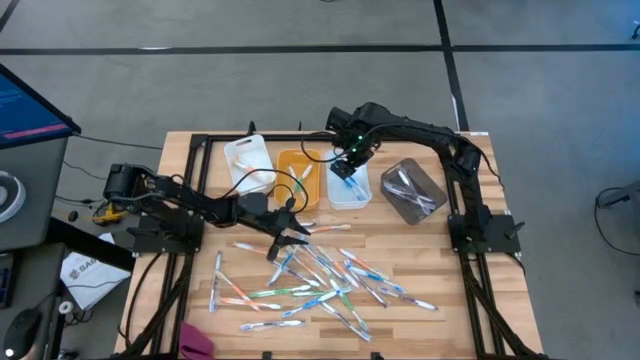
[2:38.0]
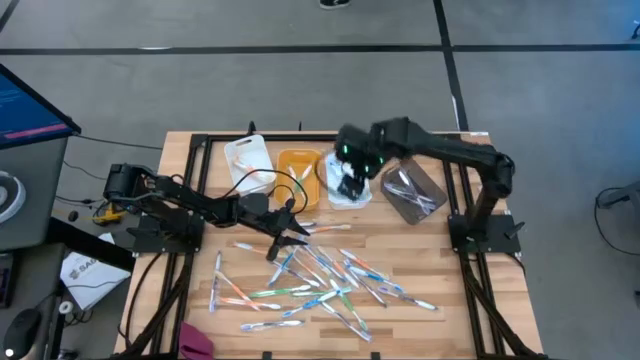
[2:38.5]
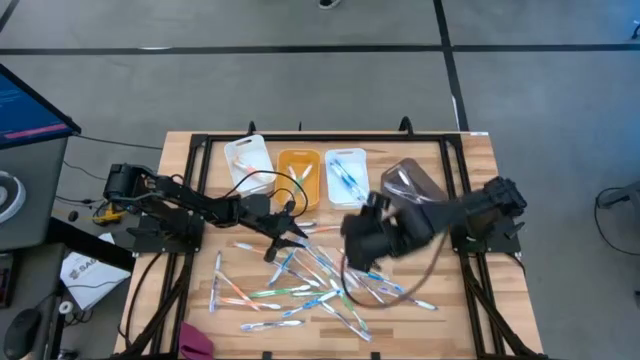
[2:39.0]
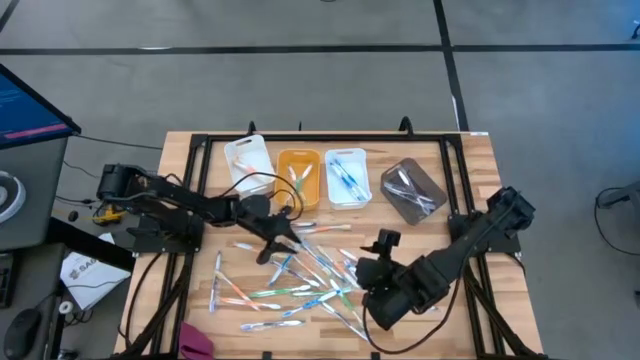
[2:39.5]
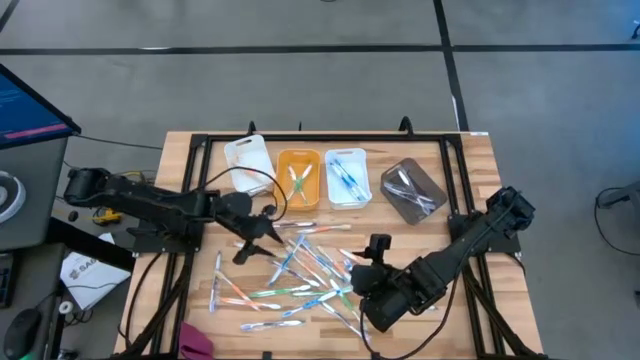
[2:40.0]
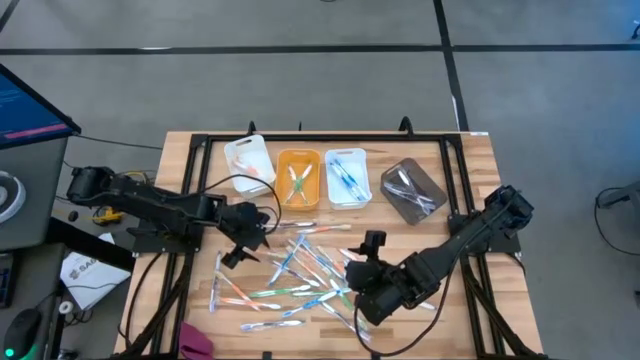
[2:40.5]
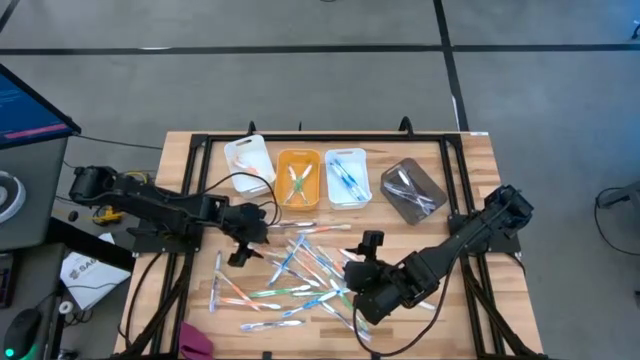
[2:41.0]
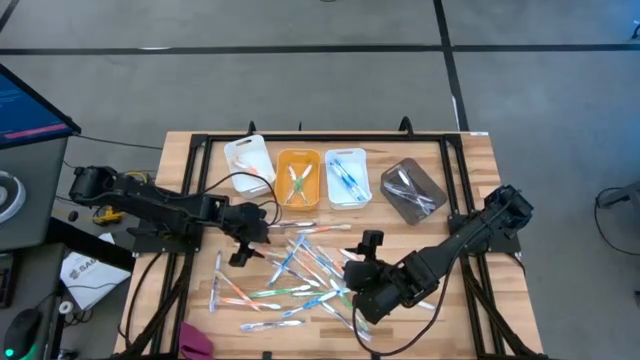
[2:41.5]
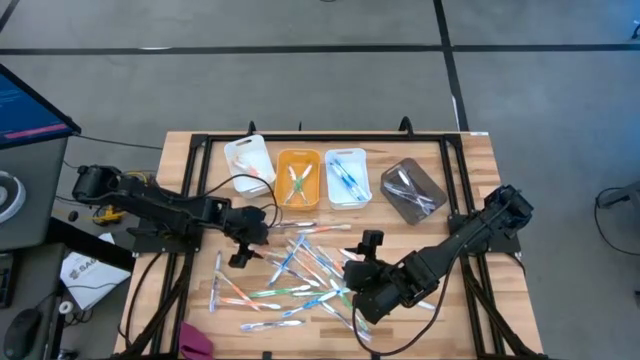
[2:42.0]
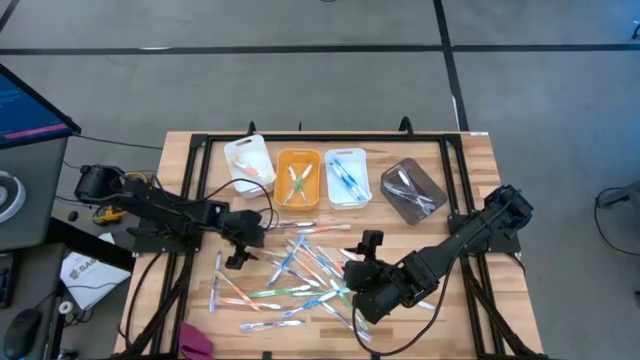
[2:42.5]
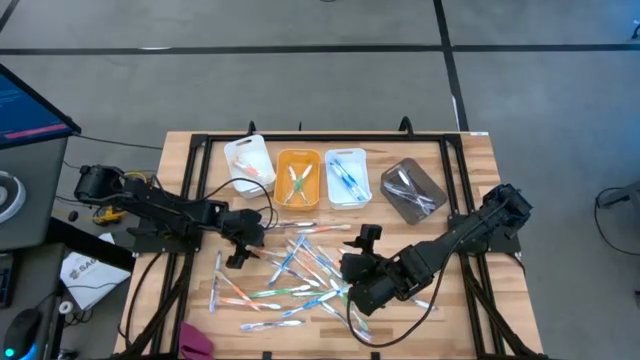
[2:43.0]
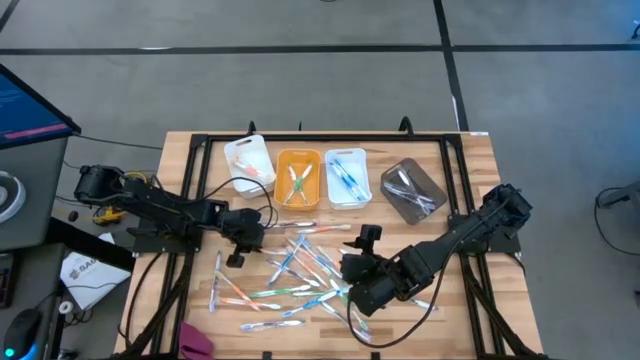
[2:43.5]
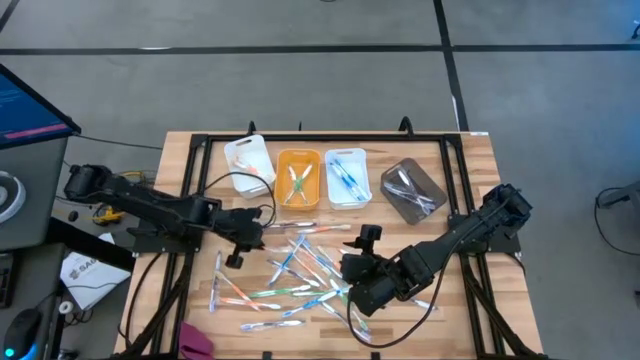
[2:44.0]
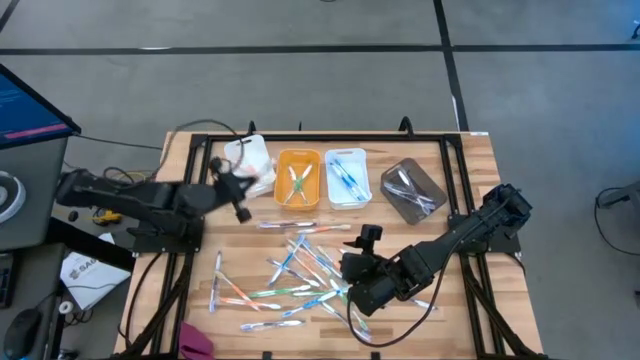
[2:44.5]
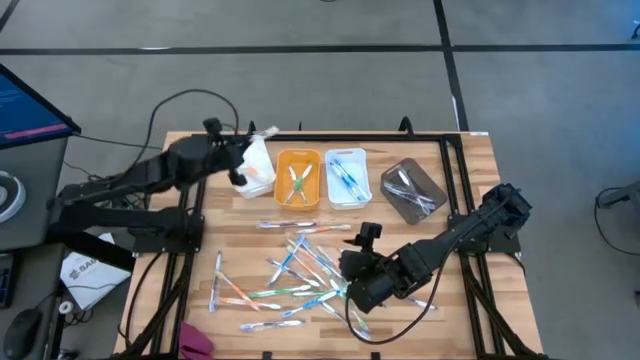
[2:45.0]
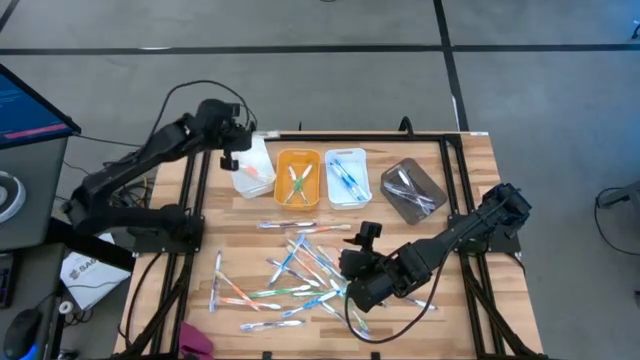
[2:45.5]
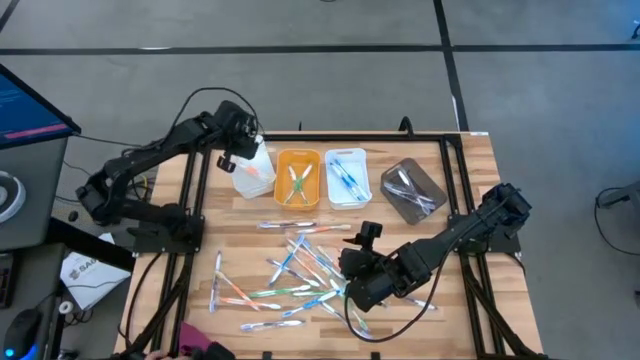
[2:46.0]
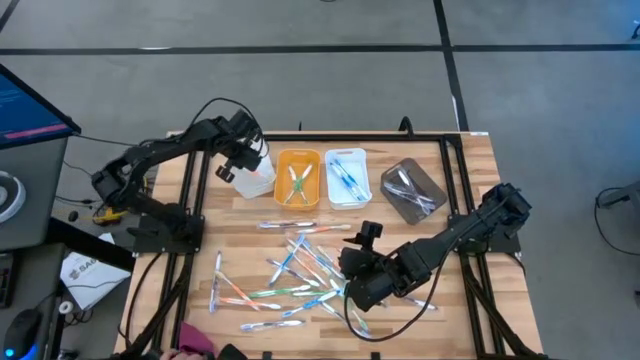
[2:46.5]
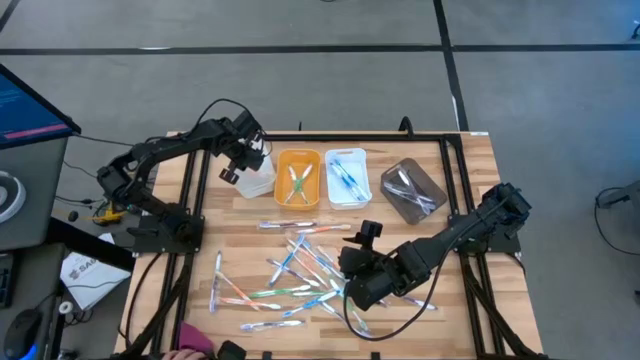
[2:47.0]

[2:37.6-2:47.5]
Task: Pick & Place Toothbrushes
Put the white orange toothbrush into the left white bin

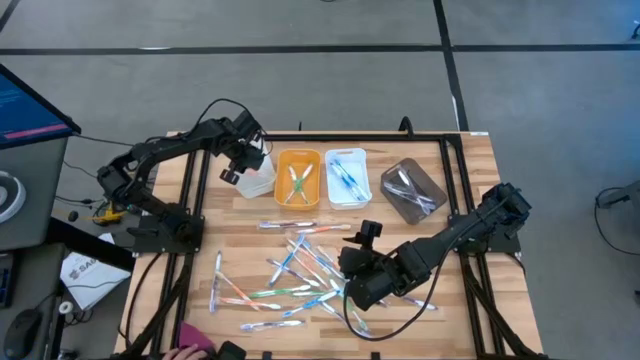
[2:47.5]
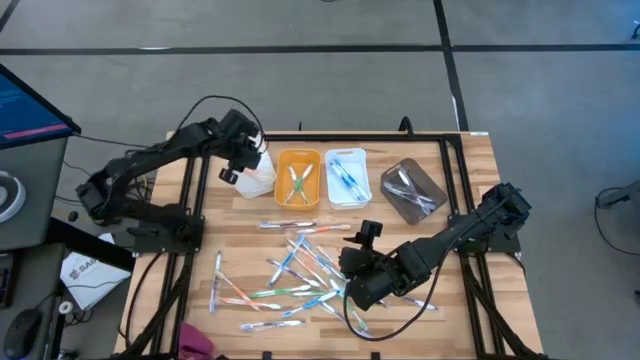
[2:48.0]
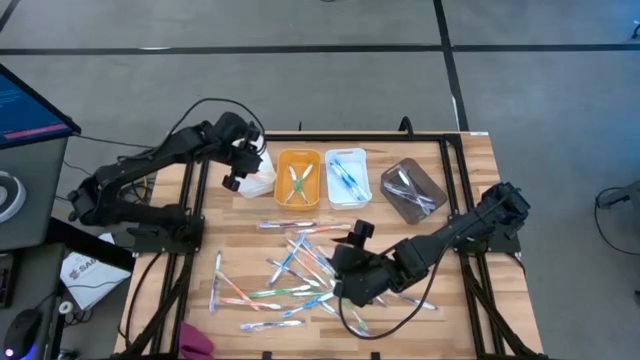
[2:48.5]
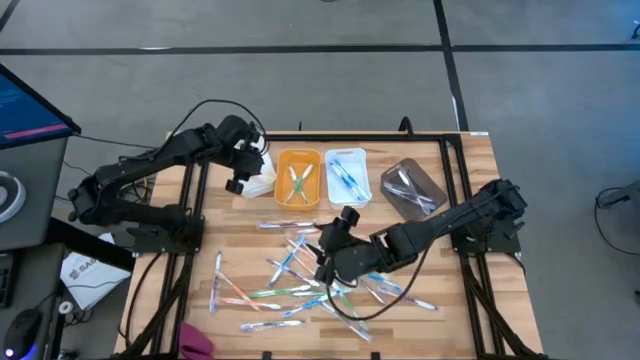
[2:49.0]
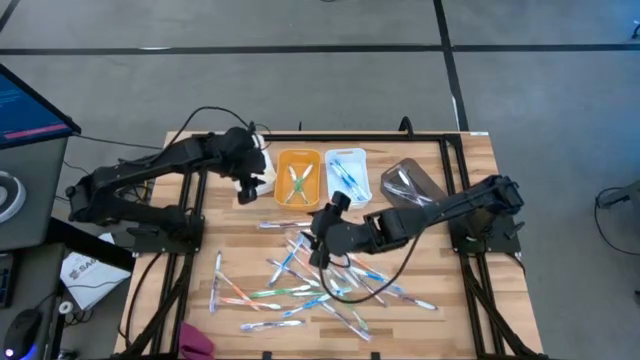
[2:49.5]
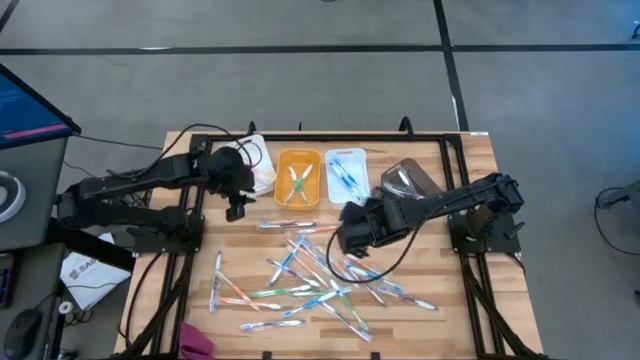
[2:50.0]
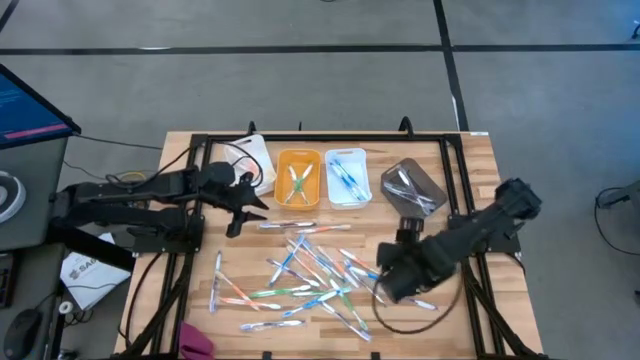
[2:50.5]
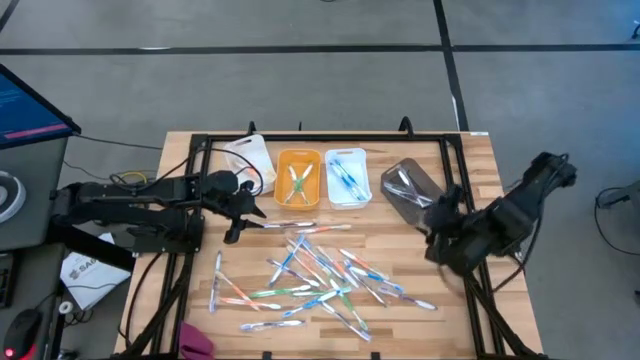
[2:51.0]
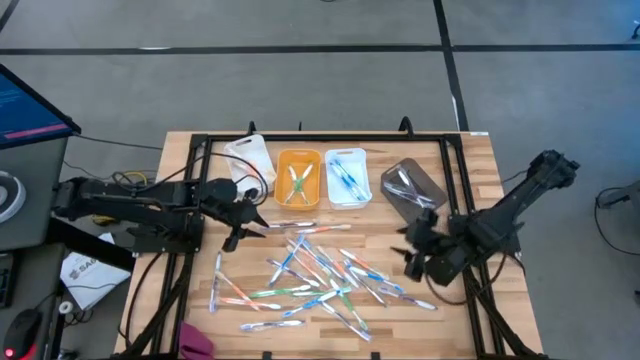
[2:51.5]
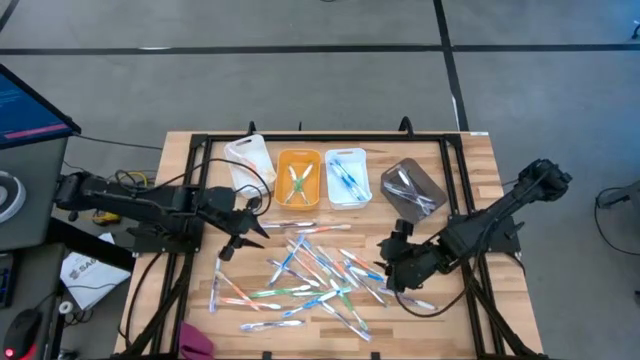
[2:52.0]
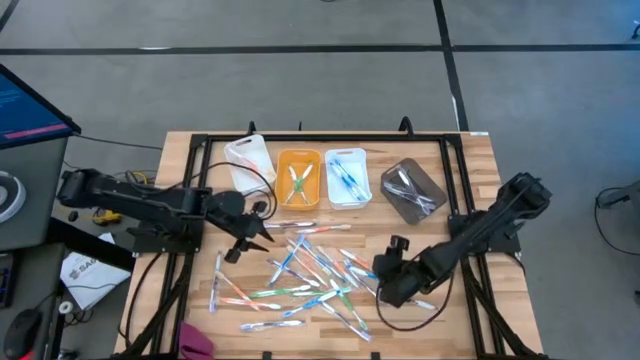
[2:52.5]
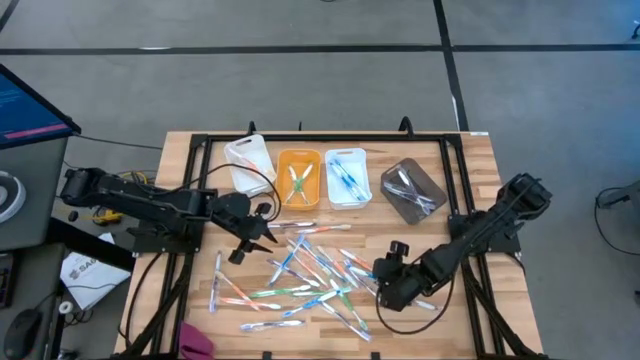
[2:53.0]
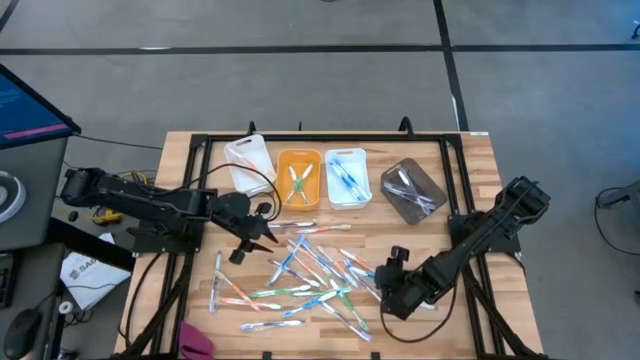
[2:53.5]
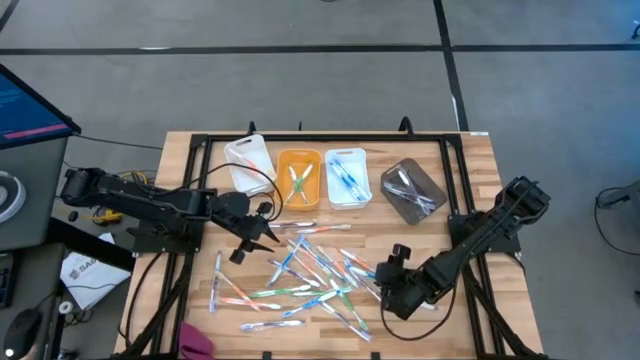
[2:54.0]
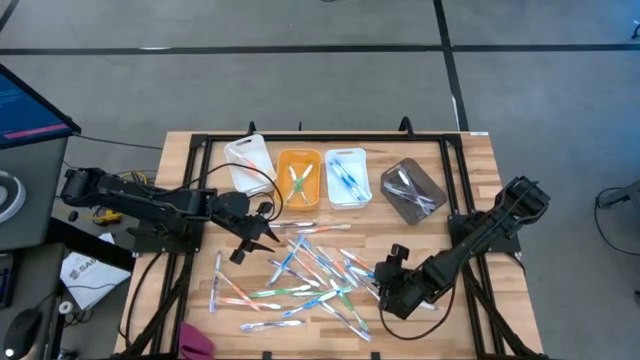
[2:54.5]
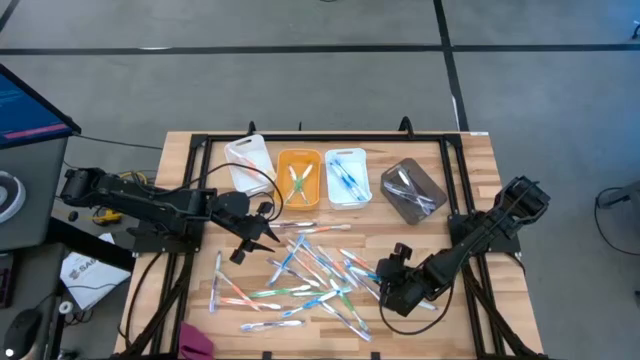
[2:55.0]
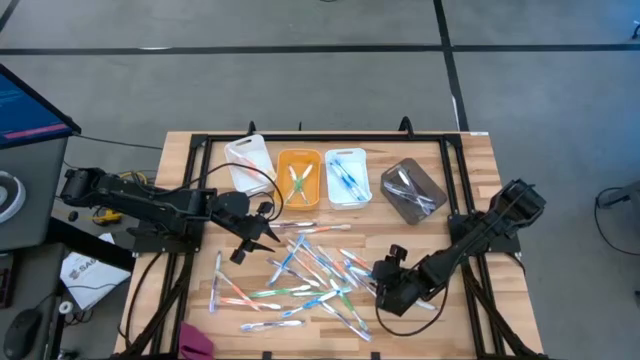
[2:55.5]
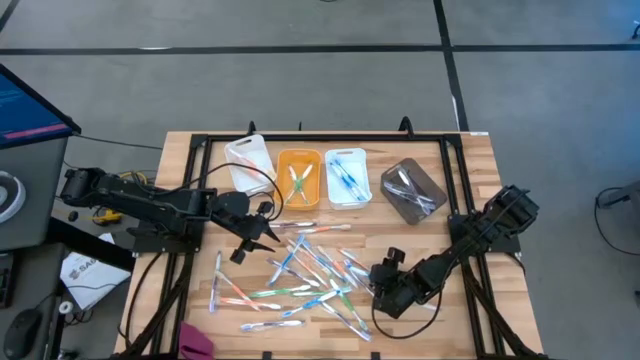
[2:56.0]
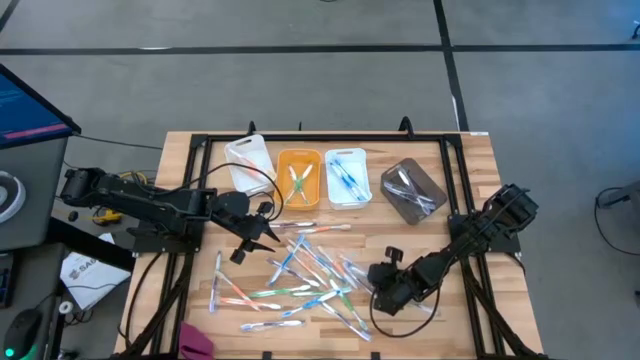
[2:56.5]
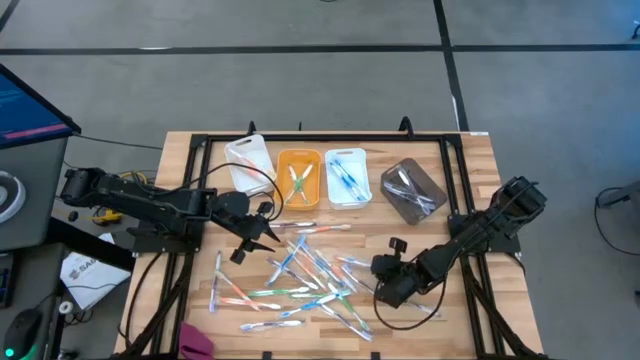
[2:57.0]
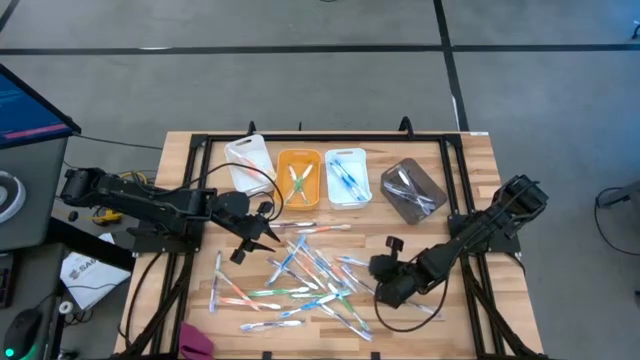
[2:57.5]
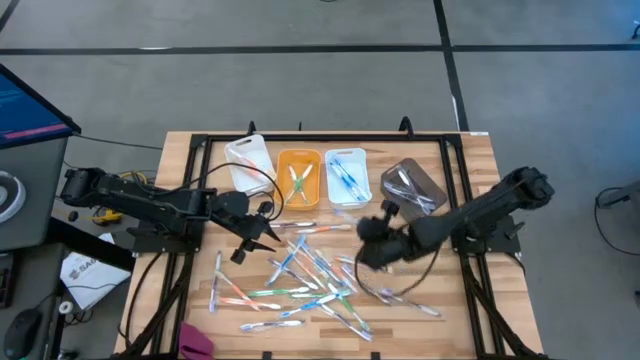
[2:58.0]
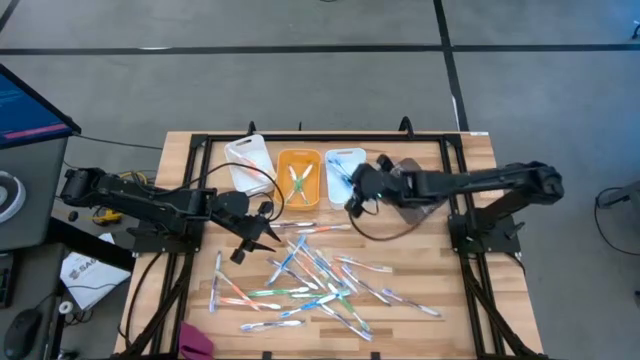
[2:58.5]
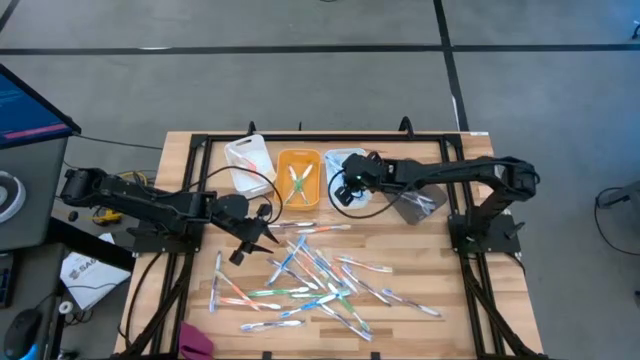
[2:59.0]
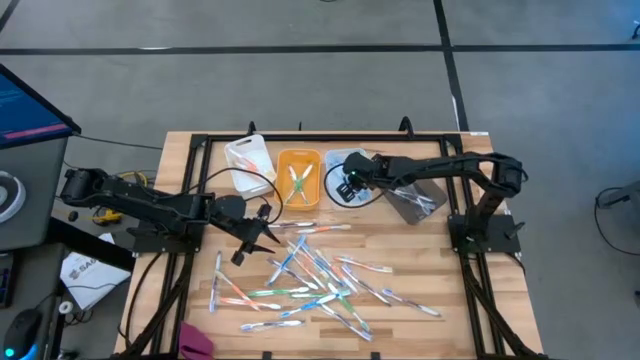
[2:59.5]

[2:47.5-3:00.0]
Put the white blue toothbrush into the right white bin
